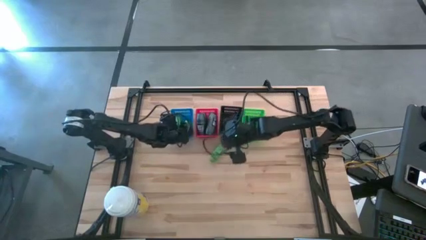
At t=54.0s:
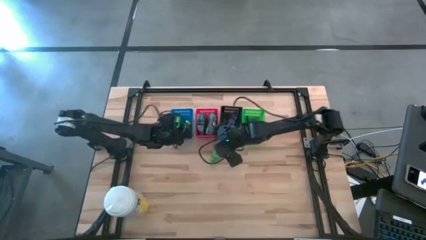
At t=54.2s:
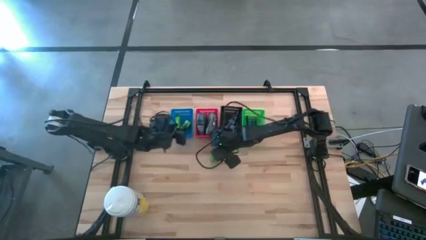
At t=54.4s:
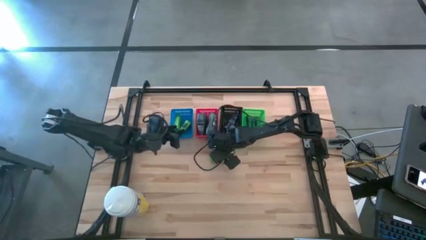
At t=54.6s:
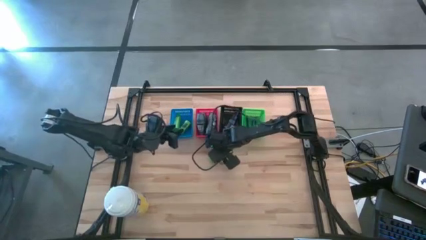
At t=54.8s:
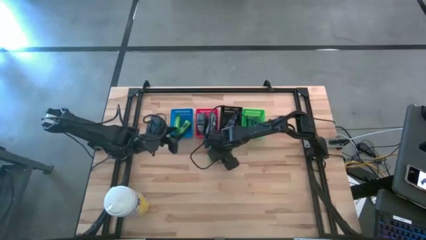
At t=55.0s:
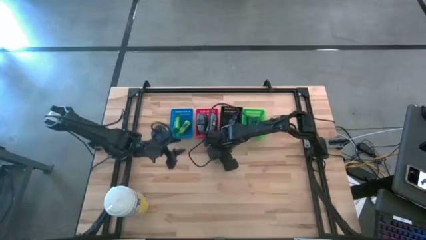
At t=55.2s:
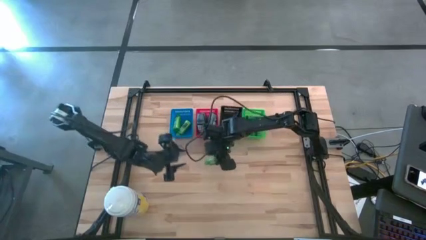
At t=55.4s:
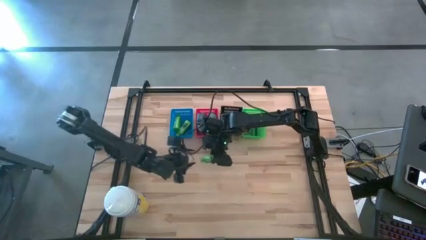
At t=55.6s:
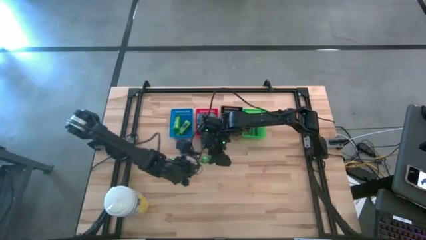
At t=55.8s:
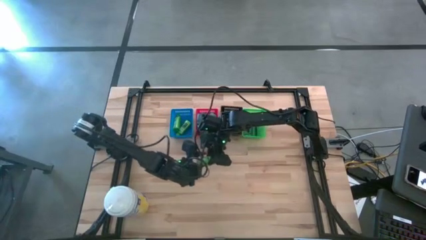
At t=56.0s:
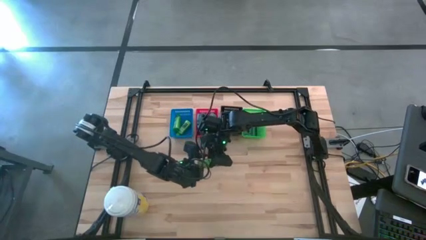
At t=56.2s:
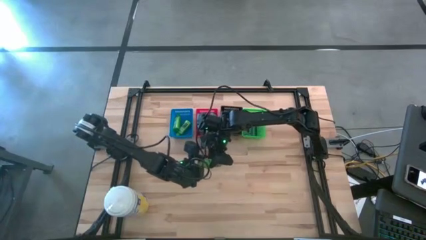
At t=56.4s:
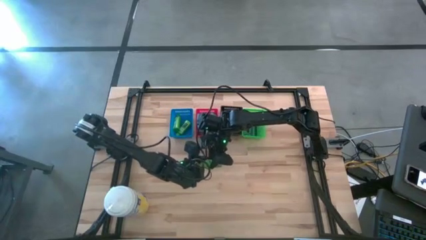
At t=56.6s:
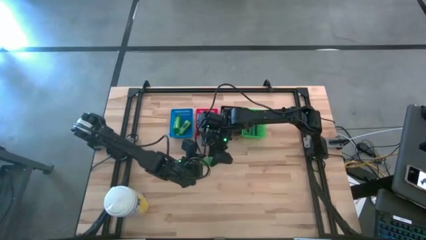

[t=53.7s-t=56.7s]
Task: Pick & Place Travel size toiletries
Put the green shampoo into the blue bin

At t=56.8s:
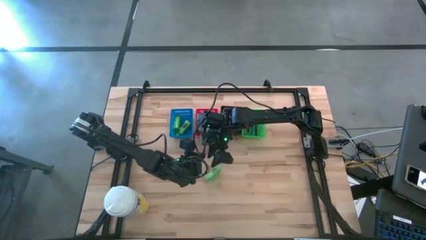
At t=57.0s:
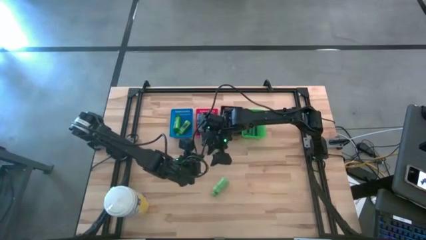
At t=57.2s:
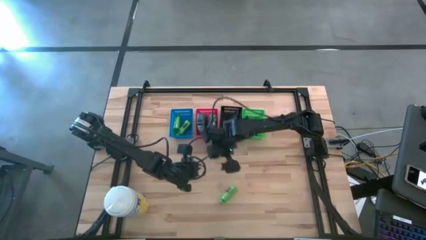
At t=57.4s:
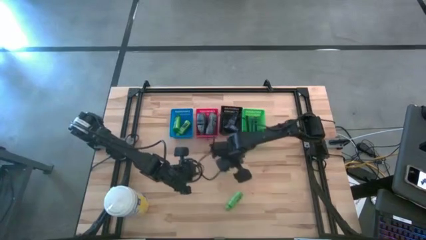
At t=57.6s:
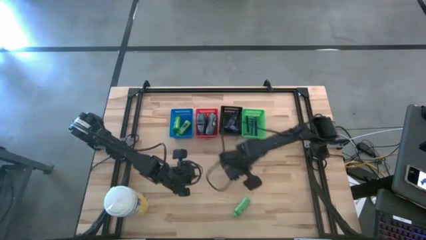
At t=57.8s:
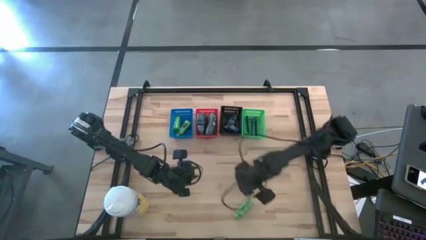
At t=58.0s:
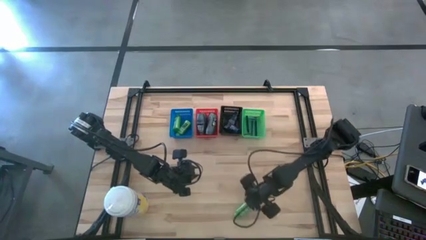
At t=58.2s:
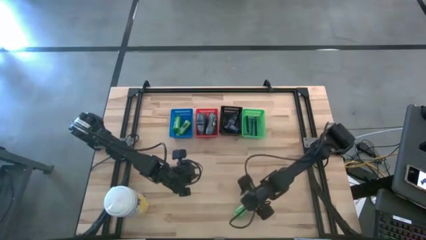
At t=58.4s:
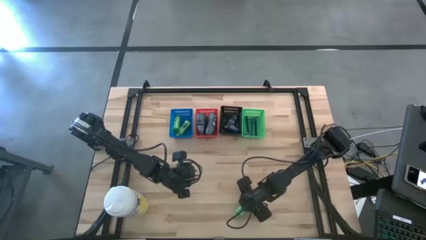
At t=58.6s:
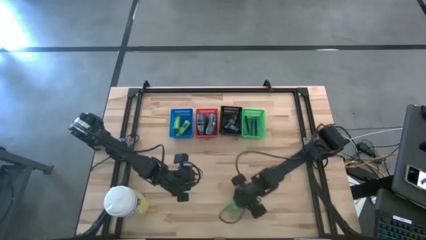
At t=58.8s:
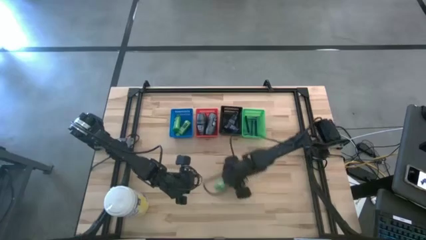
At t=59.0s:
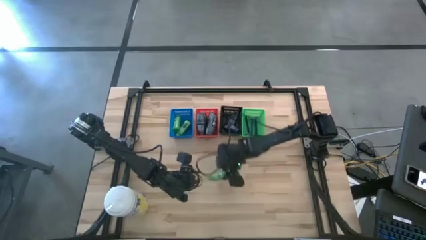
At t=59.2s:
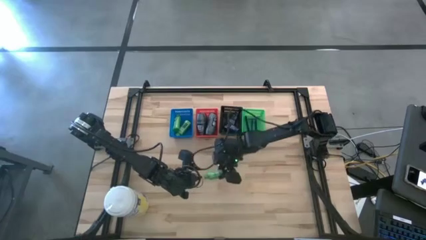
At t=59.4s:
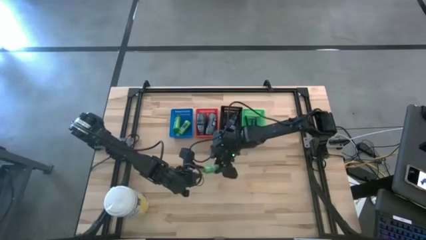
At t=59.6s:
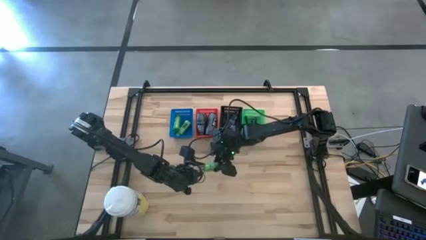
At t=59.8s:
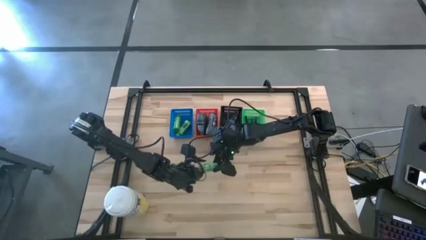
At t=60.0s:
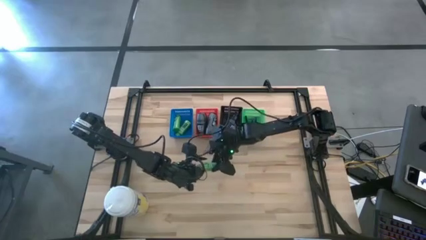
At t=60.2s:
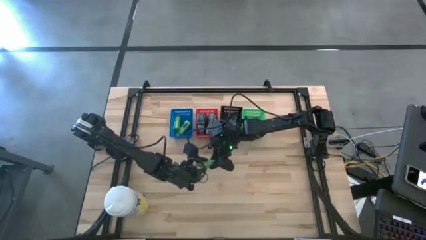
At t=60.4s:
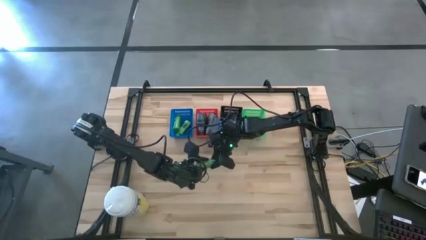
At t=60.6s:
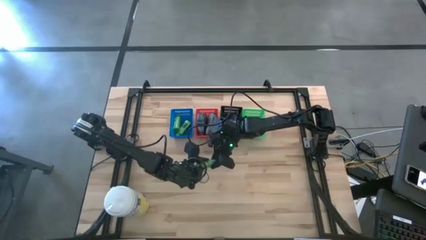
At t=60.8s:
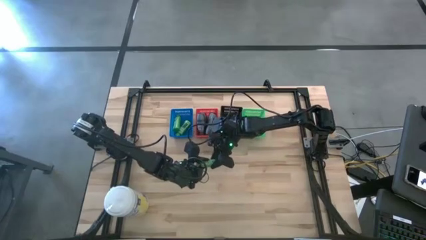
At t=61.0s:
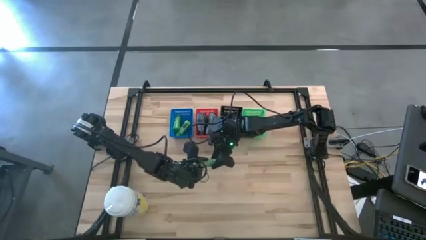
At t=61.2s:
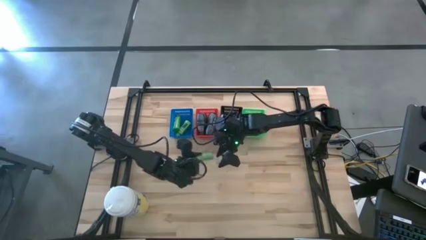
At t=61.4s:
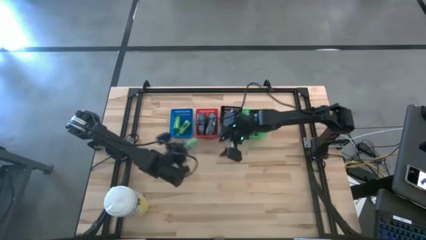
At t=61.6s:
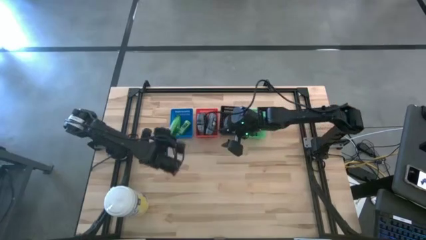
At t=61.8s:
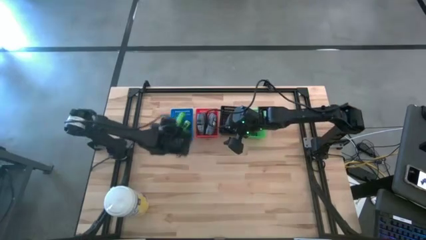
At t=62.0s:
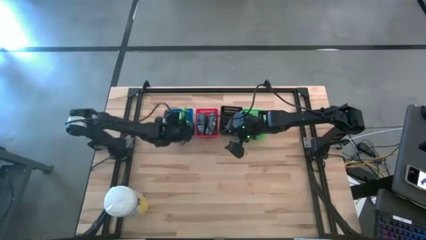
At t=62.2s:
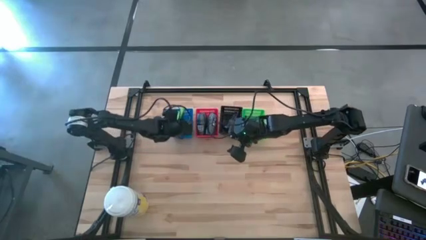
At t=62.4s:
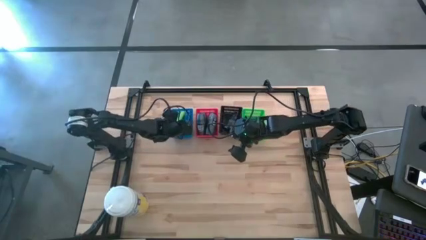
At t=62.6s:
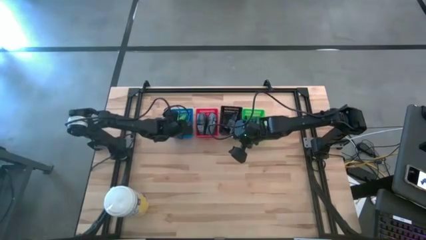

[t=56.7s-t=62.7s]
Put the green shampoo into the blue bin

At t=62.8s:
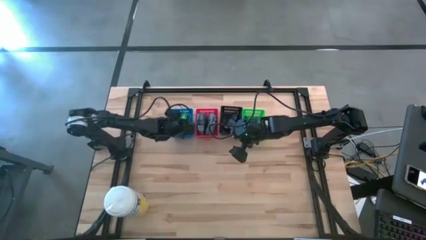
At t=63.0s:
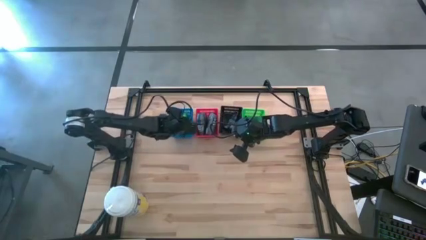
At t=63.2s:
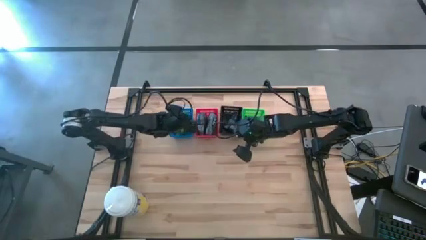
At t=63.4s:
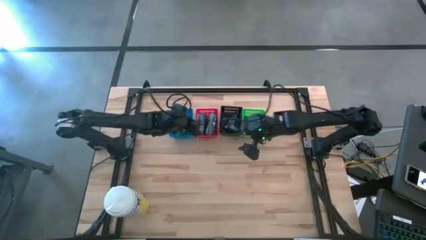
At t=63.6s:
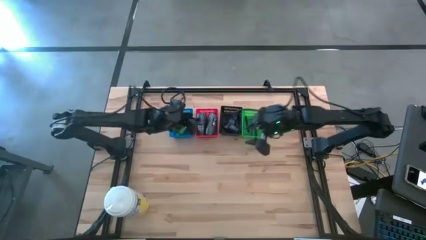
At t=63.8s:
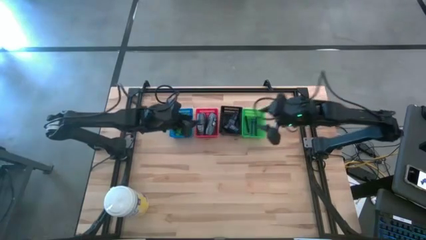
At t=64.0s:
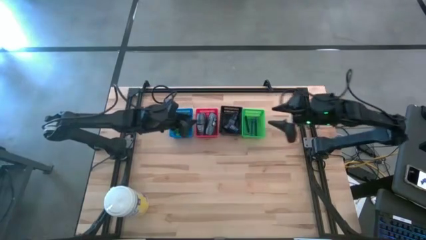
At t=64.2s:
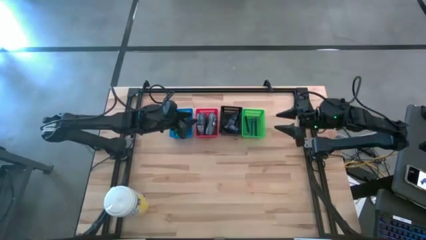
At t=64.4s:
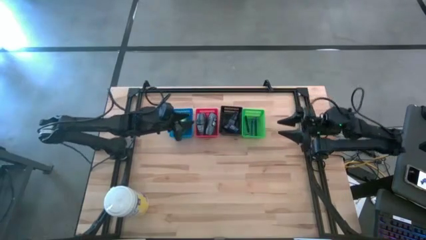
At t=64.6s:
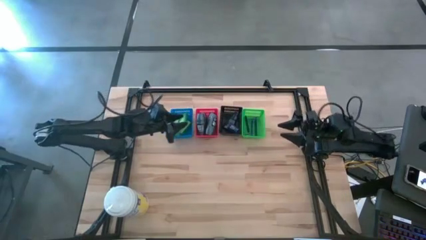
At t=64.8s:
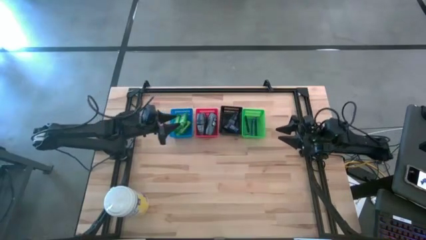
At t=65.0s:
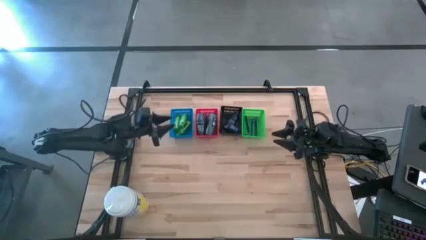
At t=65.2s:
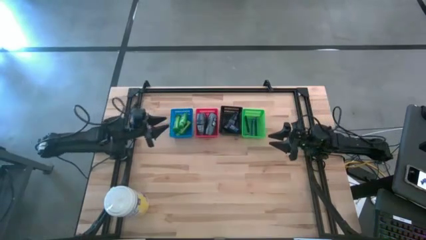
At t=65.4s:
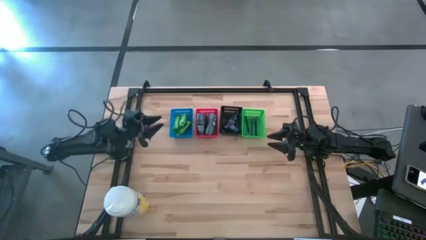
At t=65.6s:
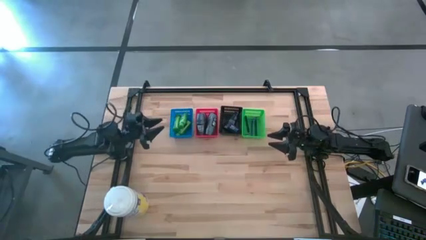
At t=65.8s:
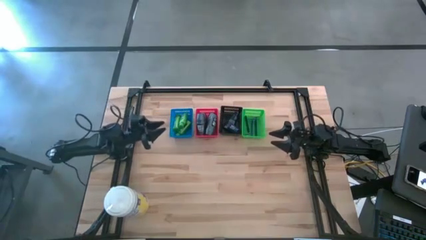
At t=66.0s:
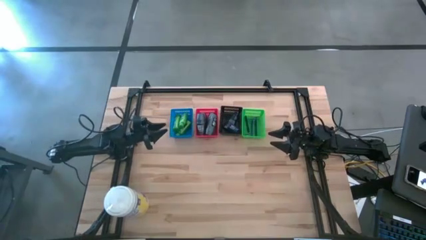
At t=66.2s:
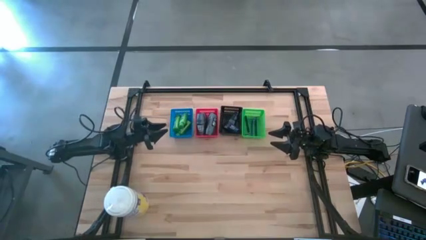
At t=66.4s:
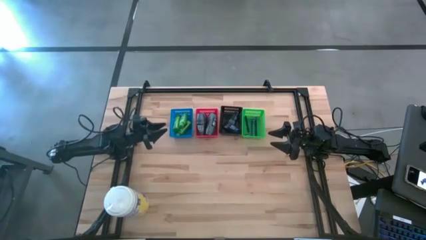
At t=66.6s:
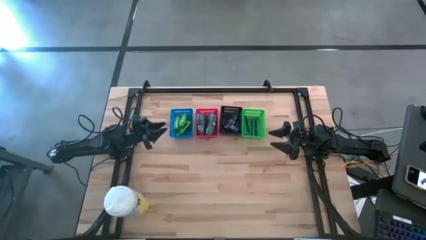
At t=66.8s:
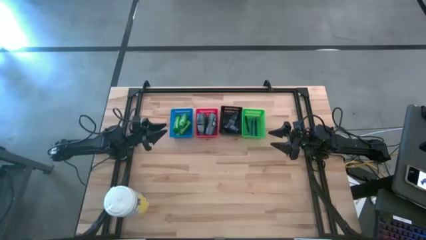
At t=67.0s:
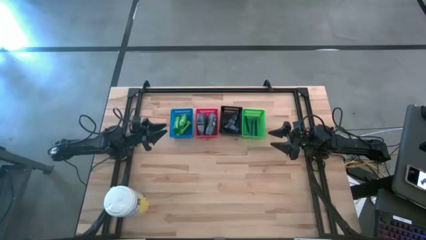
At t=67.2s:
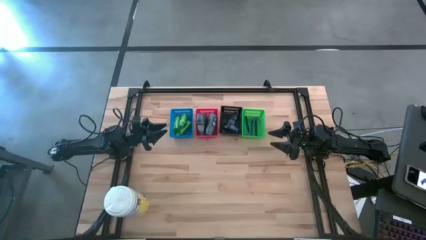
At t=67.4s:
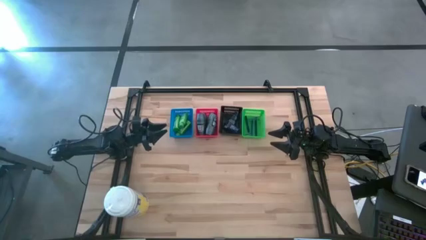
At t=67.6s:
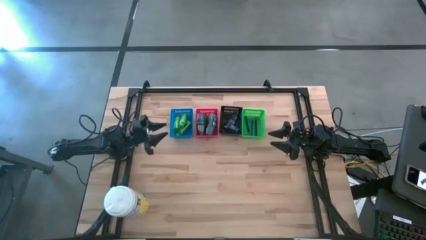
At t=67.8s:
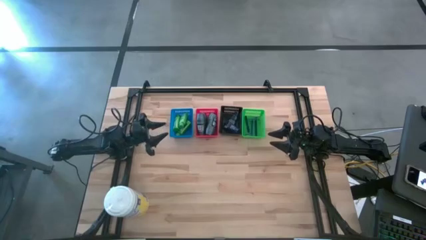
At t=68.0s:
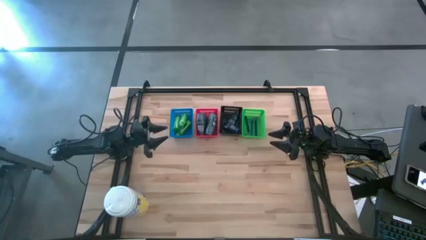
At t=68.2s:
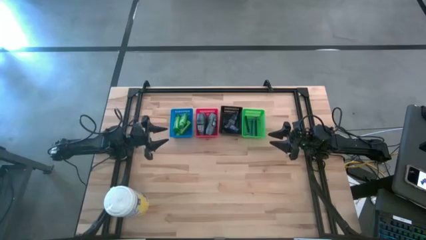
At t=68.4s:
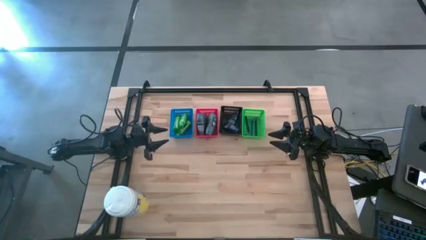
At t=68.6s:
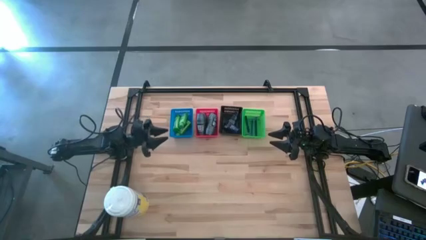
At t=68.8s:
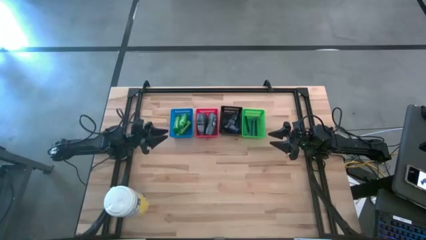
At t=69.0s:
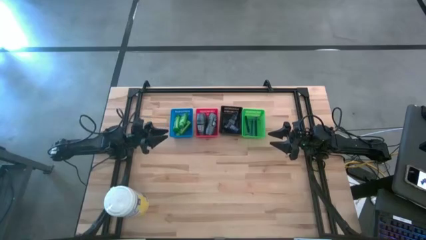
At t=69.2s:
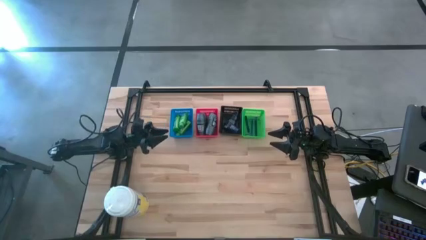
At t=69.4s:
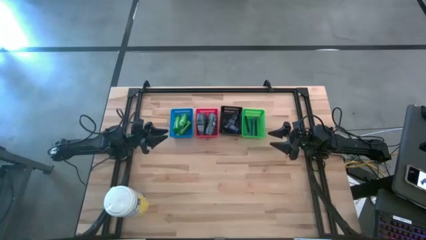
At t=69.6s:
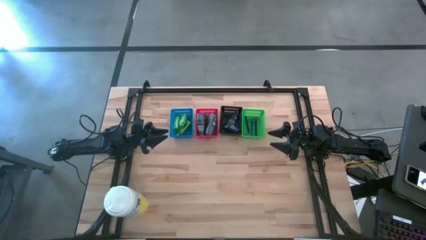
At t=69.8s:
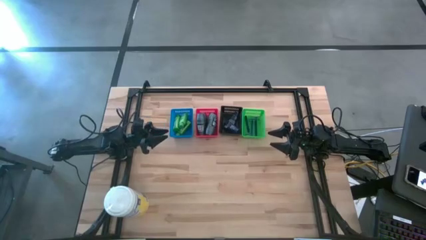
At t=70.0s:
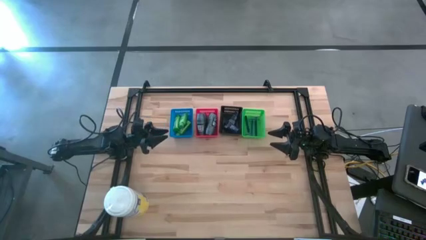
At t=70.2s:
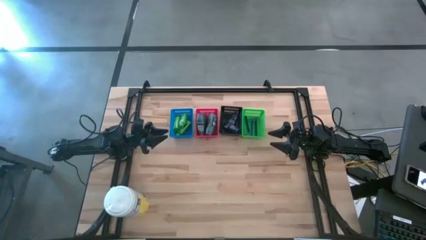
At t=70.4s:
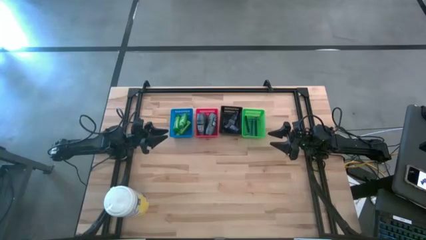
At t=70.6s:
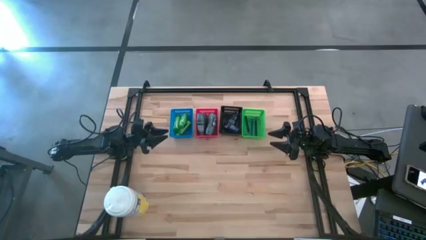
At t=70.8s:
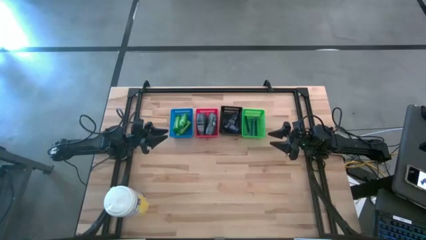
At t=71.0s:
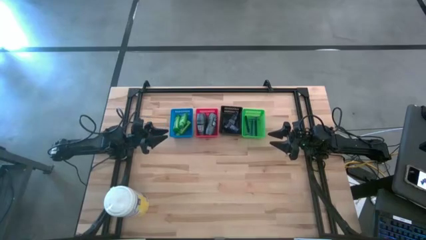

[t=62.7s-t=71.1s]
Return to Home Position
